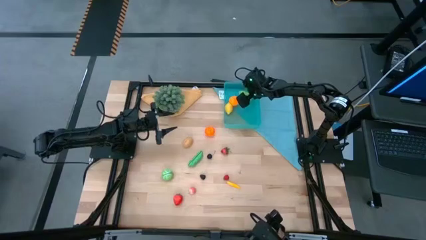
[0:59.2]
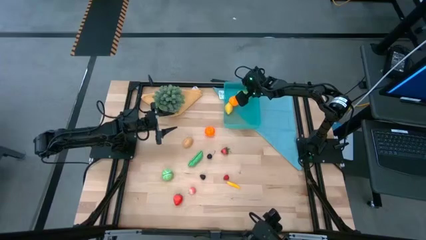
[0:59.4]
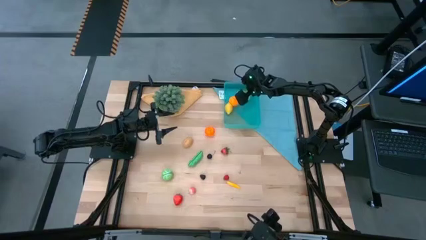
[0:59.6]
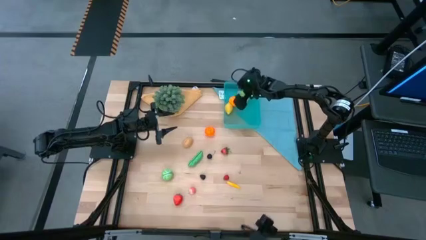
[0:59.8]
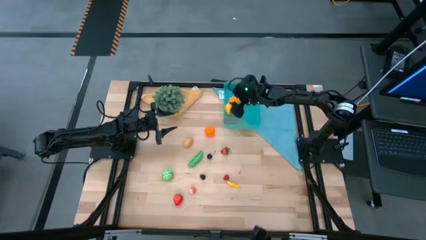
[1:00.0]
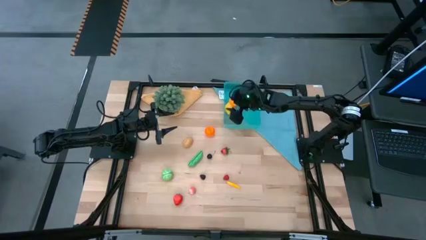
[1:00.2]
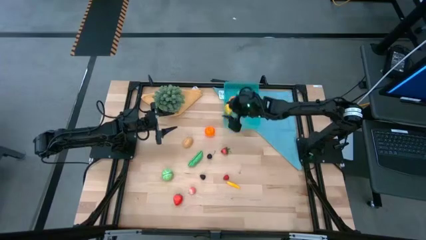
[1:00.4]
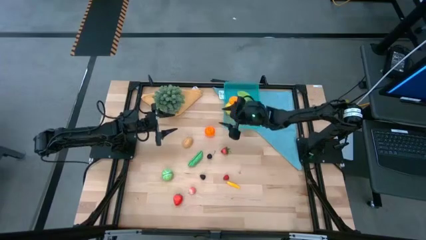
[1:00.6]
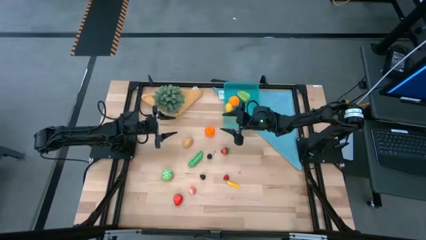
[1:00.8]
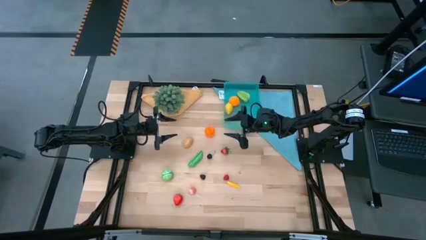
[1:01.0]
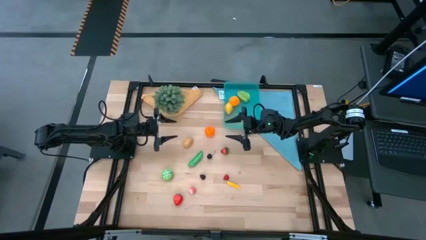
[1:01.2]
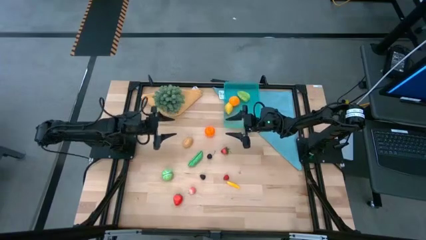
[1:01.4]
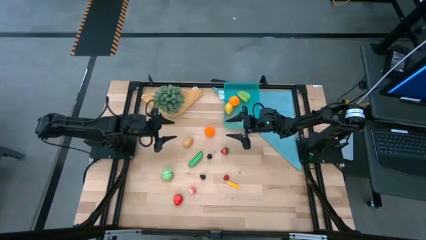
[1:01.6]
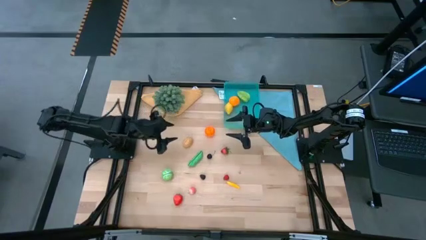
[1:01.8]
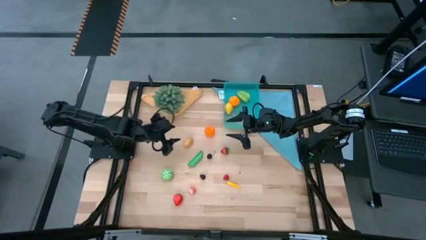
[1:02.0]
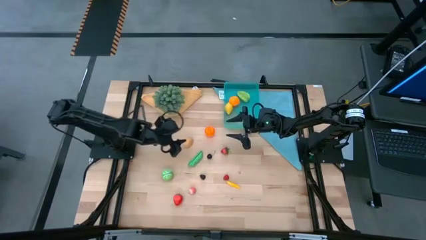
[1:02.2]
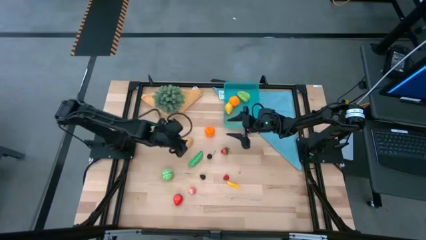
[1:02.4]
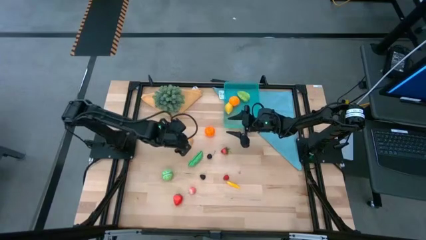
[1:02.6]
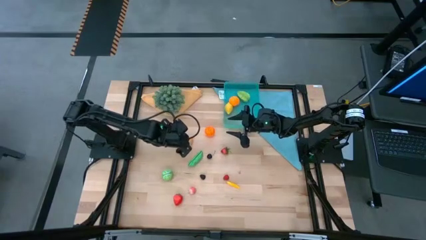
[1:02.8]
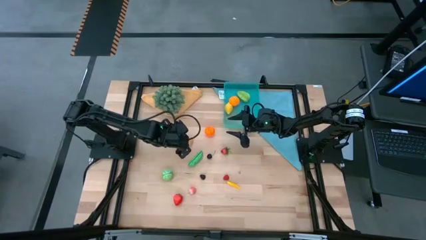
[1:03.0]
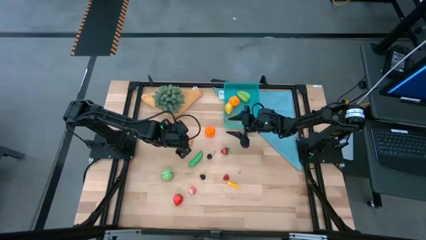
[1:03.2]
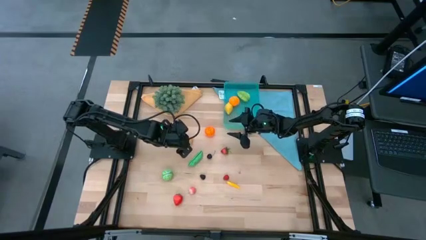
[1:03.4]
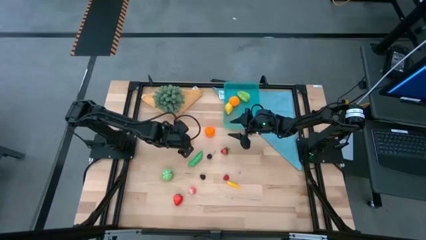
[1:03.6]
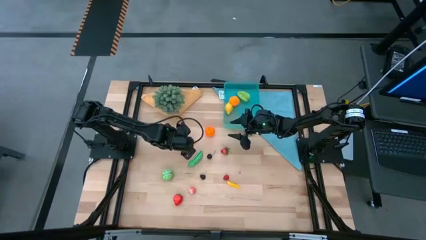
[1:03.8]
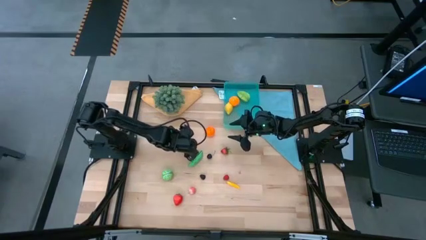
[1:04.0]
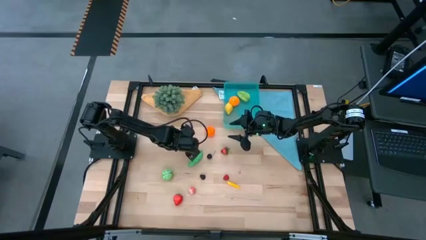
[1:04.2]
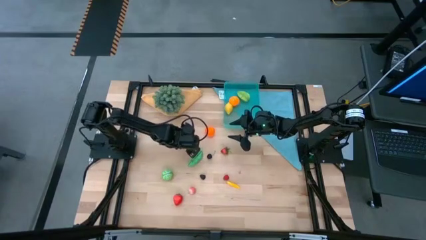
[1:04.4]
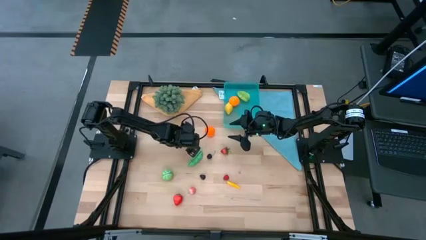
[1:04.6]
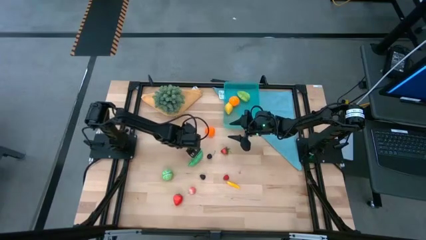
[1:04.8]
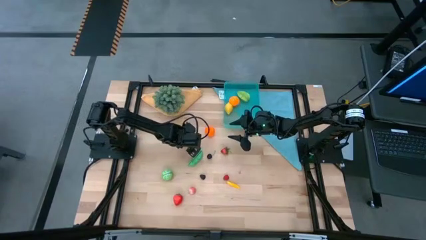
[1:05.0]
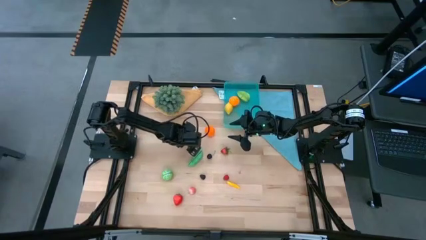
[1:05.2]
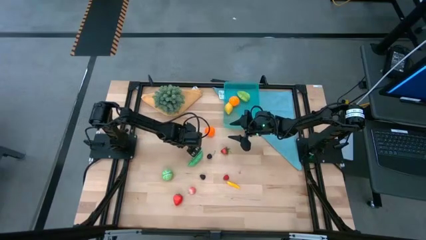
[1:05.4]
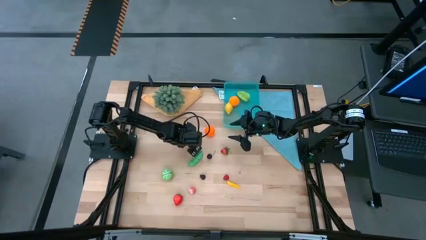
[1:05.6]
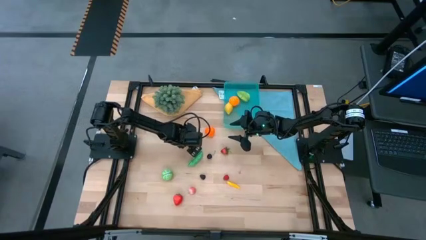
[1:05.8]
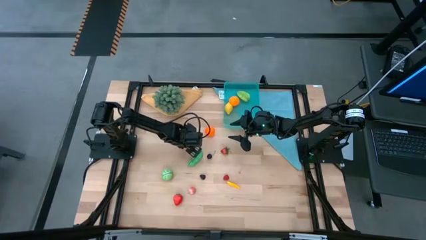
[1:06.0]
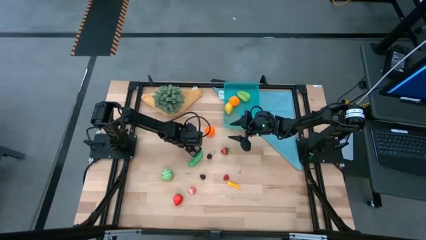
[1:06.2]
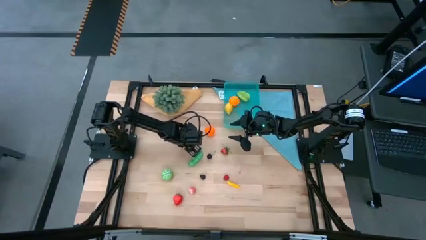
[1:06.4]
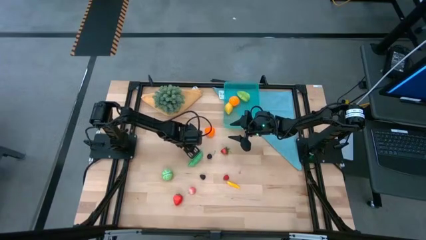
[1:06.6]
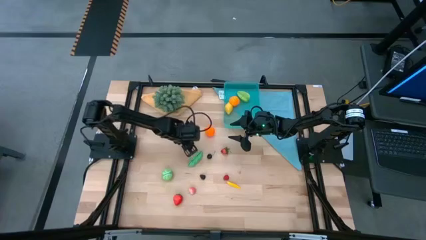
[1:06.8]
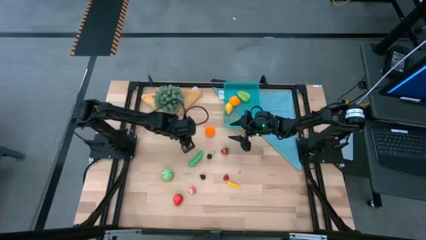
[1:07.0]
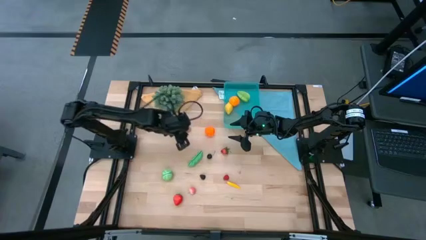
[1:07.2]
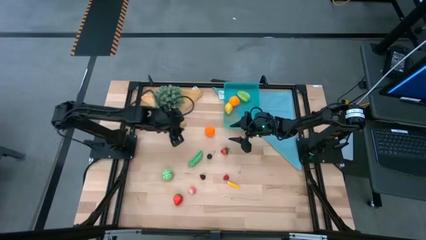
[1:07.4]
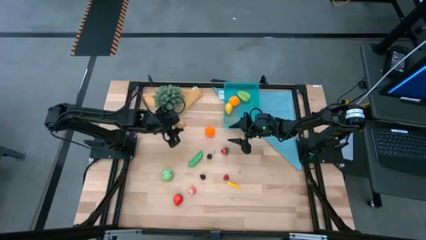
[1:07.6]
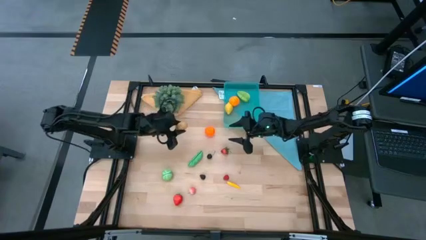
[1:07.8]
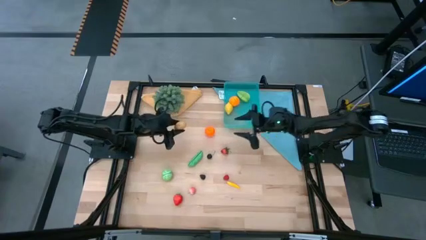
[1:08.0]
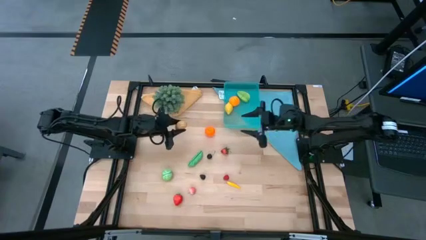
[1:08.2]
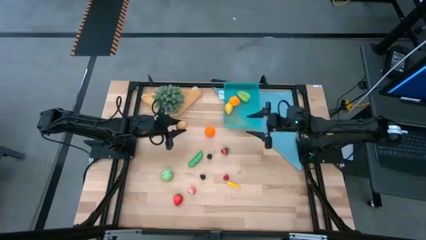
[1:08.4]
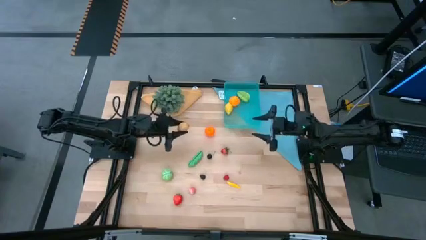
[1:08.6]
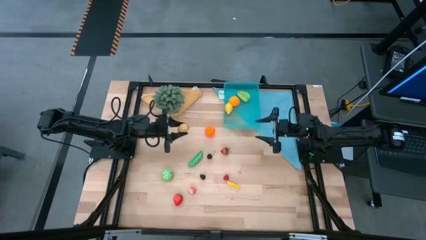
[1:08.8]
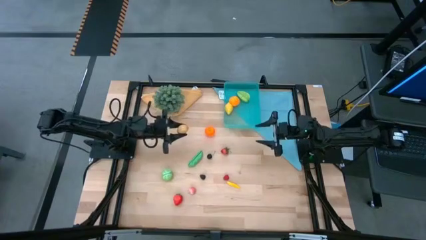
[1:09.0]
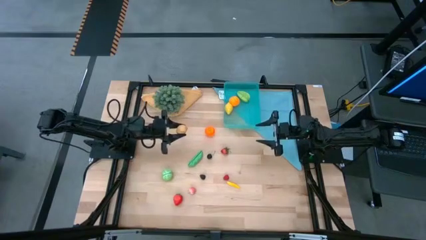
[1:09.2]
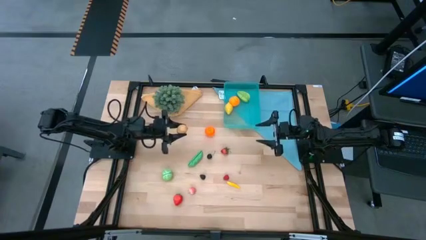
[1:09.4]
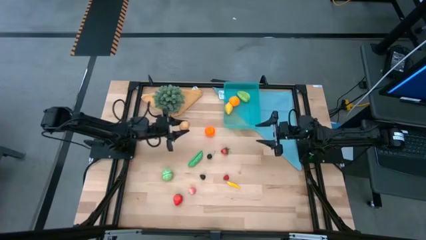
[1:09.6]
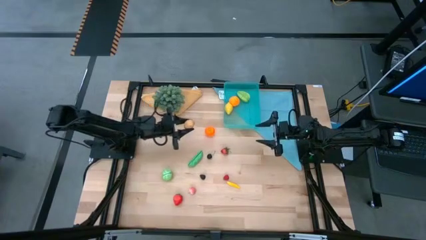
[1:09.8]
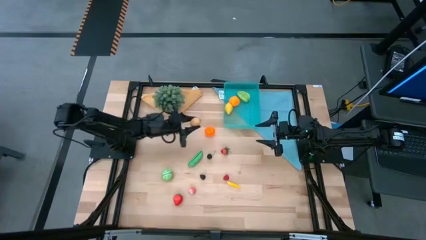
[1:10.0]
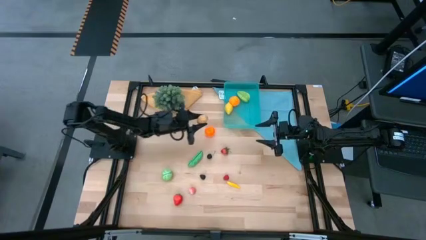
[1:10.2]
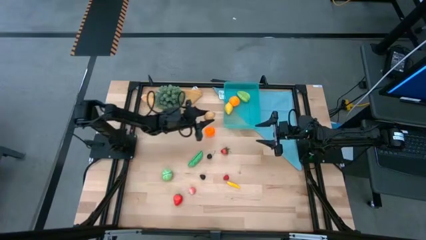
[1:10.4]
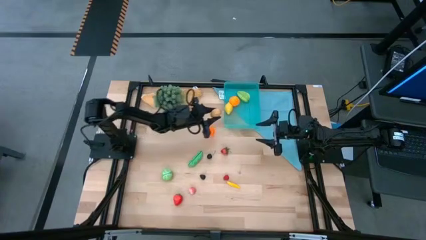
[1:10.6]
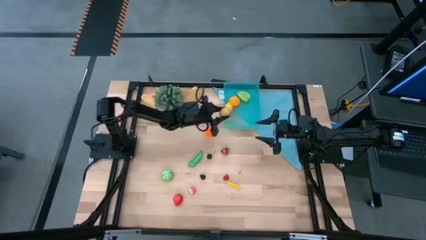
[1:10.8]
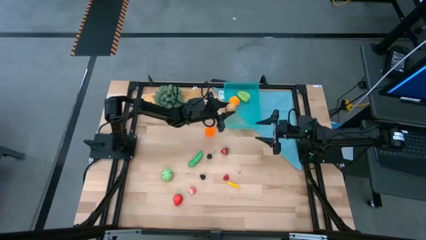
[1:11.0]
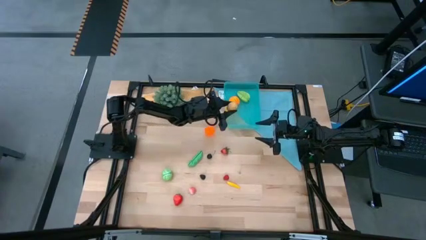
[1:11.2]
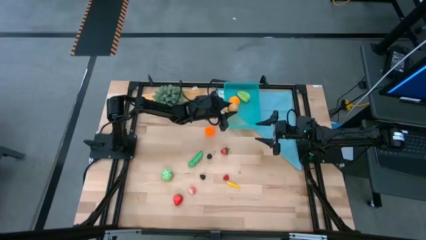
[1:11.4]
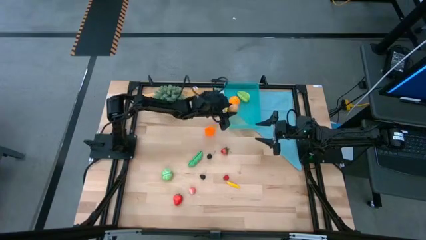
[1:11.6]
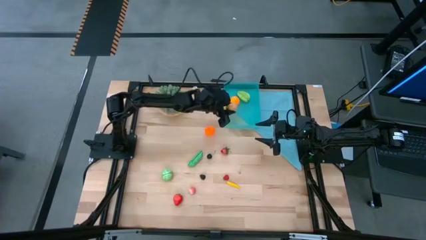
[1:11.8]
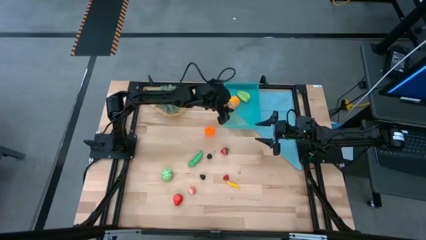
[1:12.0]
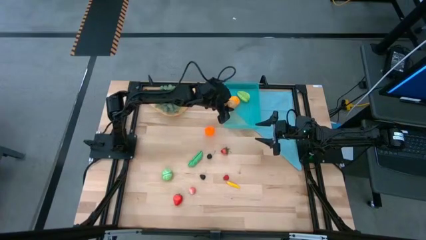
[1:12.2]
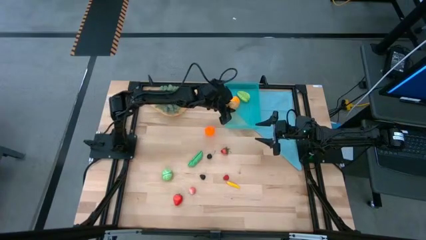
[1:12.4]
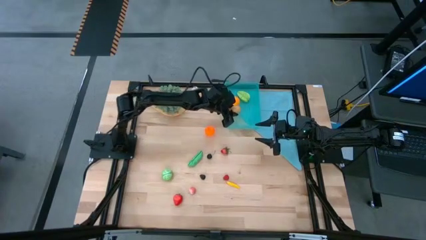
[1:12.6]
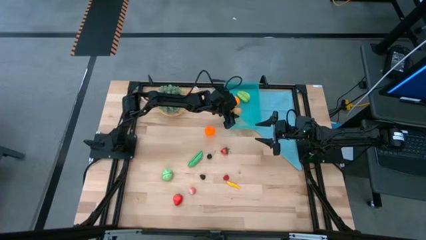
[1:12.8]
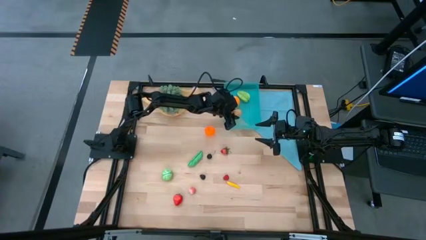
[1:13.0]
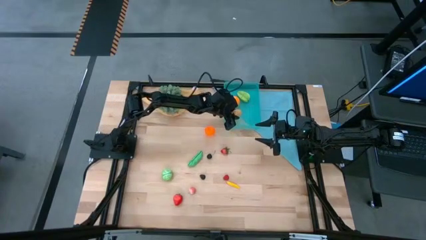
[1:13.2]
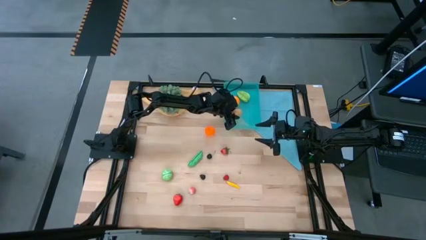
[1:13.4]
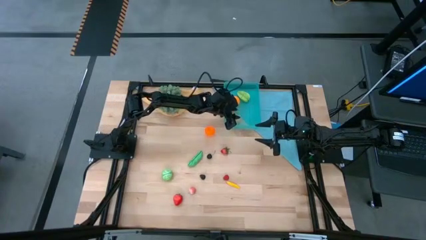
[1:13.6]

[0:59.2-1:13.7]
Task: Pick and placing Produce into tupperware
Put the brown potato into the blue bin

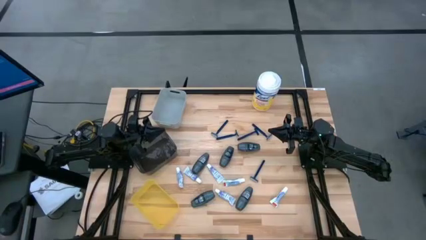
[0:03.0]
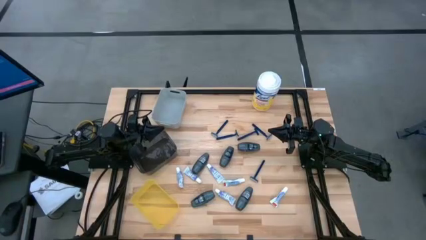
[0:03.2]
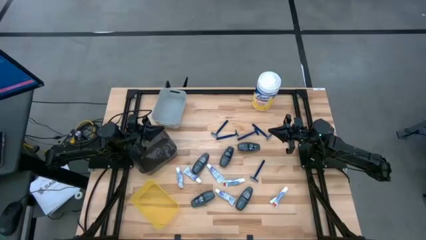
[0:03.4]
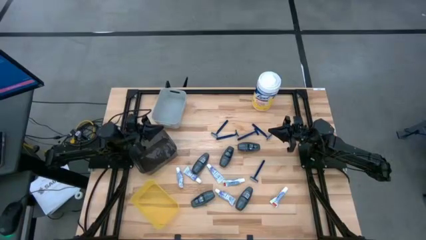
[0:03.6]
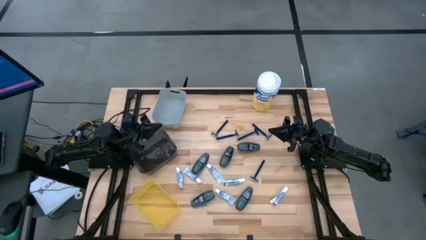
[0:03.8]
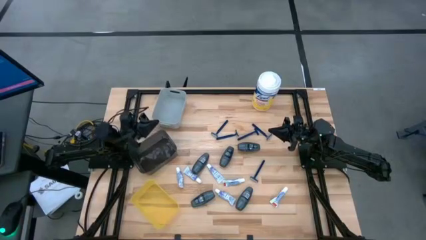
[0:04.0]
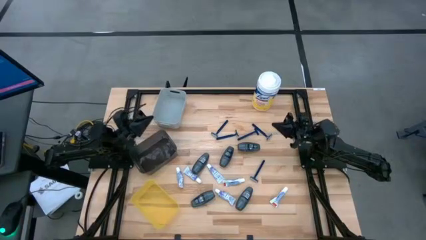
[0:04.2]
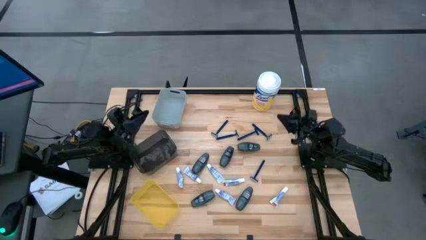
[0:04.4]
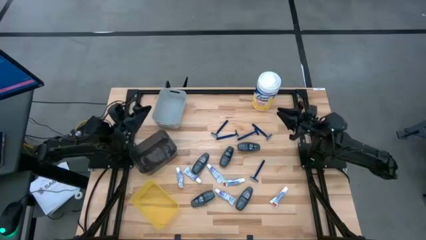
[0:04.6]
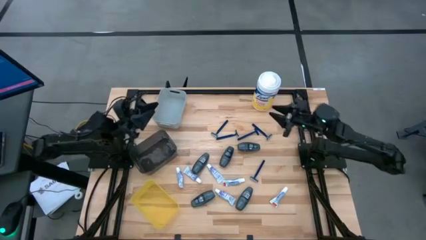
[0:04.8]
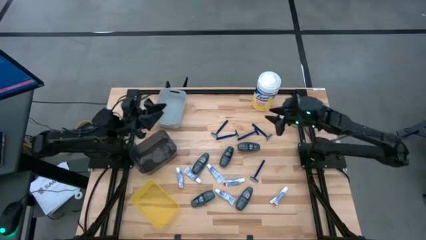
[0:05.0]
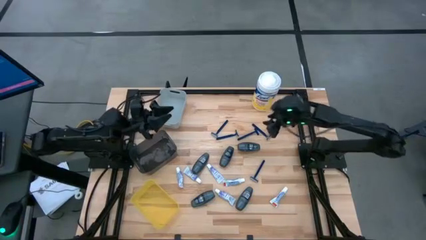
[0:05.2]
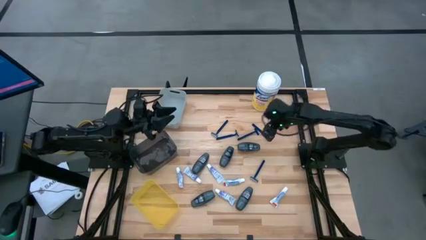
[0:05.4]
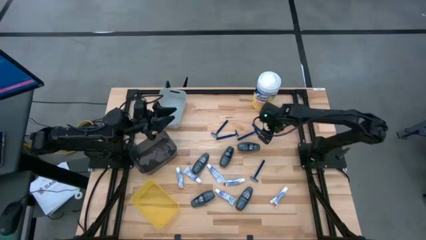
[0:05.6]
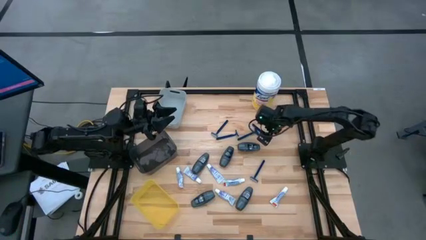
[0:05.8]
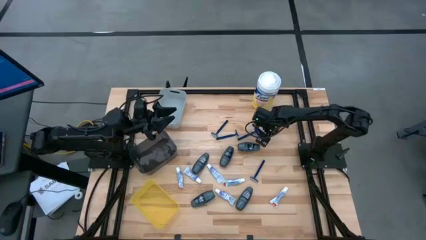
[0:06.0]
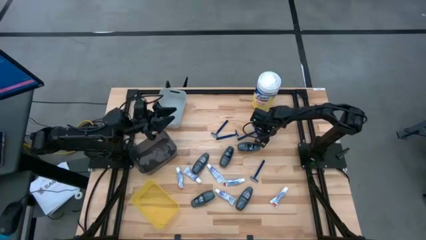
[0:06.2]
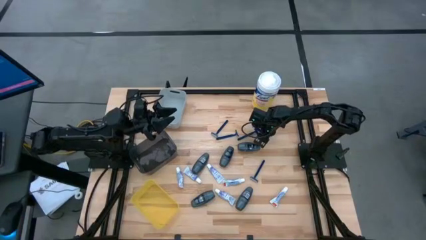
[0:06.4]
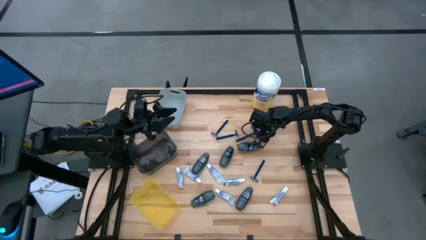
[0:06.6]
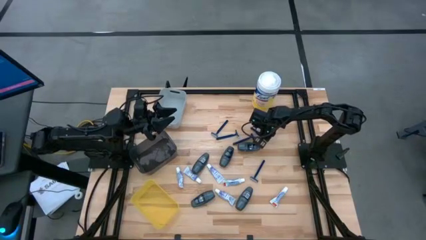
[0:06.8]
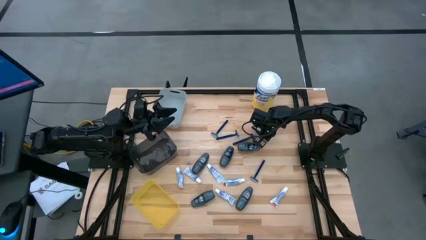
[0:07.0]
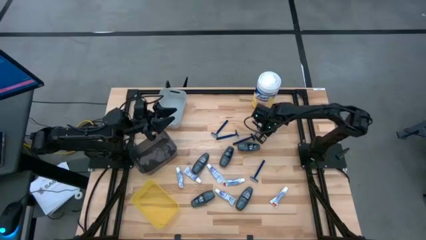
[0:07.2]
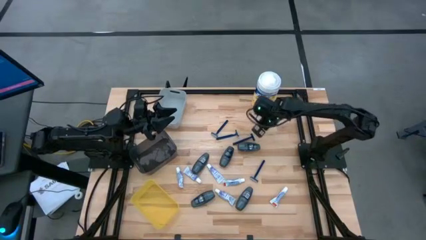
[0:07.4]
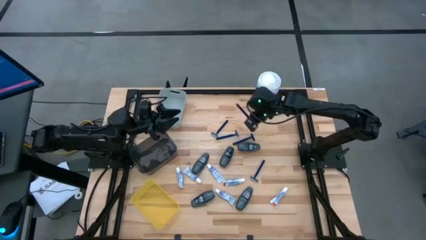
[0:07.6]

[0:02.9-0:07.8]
Task: Pick & Place Travel size toiletries
Put the razor into the gray bin
